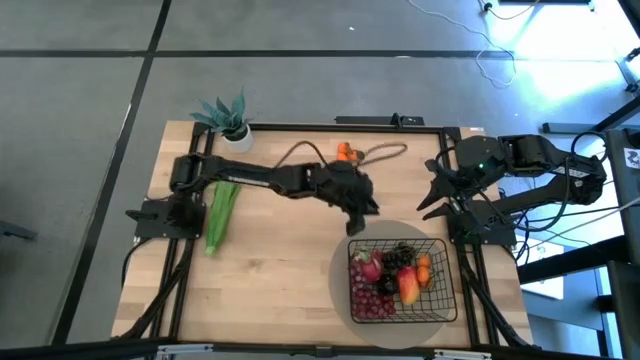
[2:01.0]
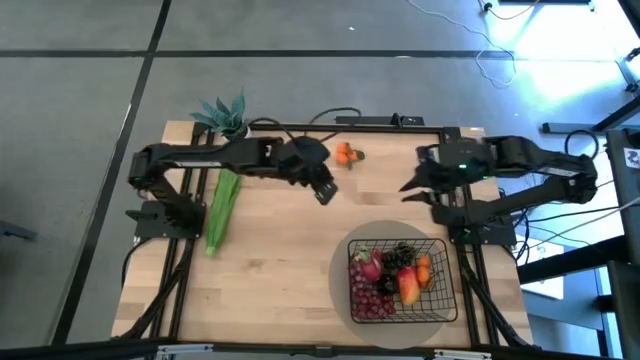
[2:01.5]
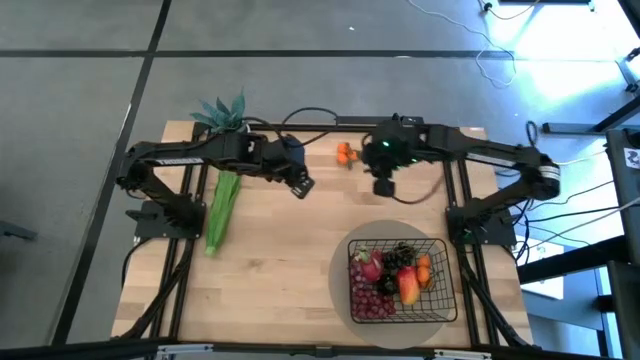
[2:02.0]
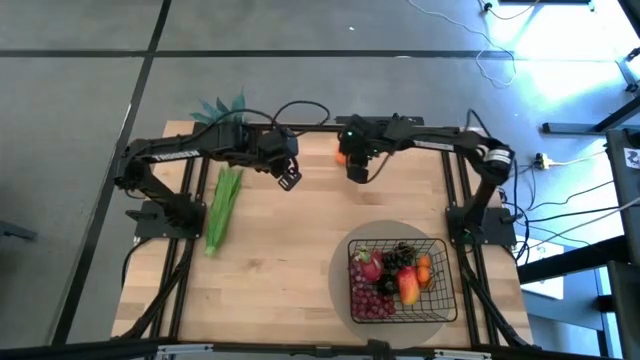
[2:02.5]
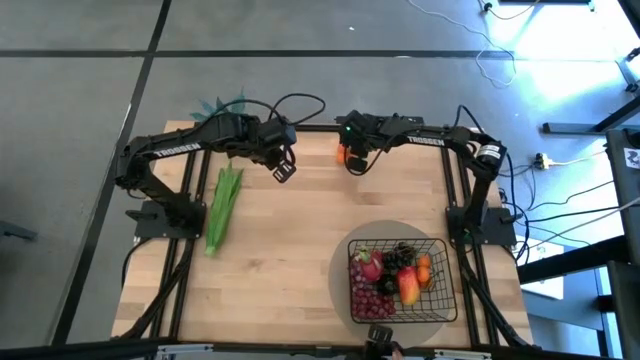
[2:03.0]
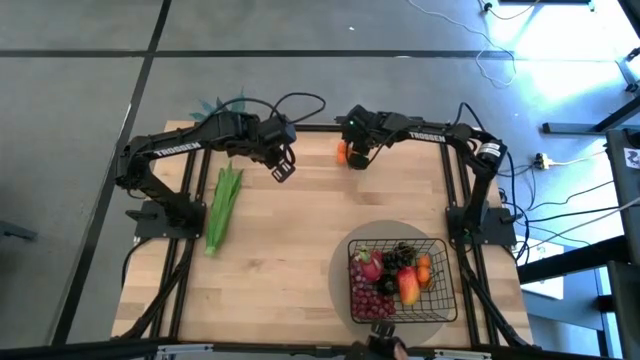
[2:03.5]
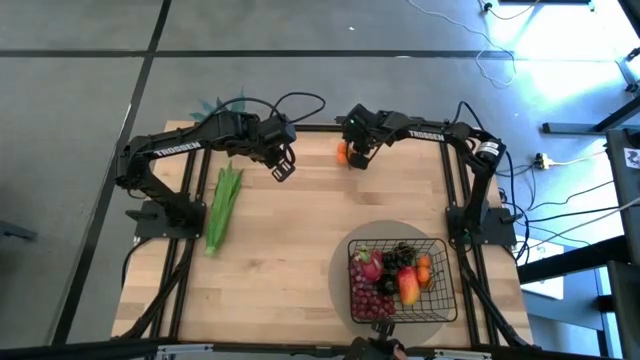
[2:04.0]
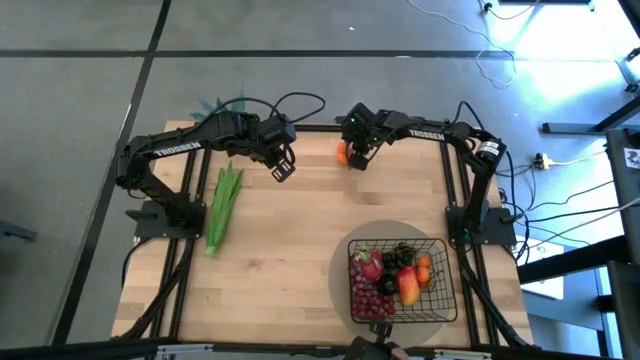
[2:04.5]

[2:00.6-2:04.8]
Task: Build produce basket
Put the orange tangerines into the black wire basket

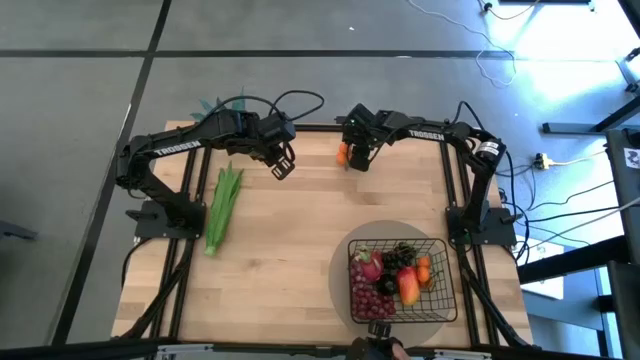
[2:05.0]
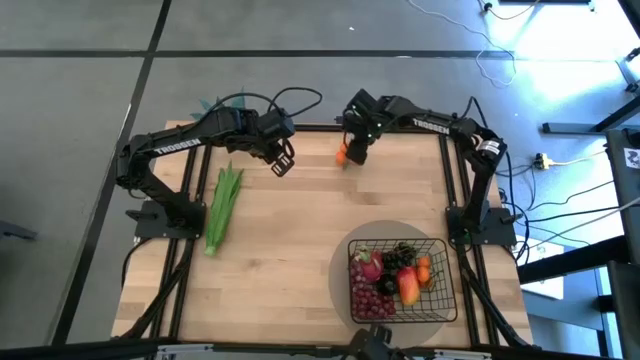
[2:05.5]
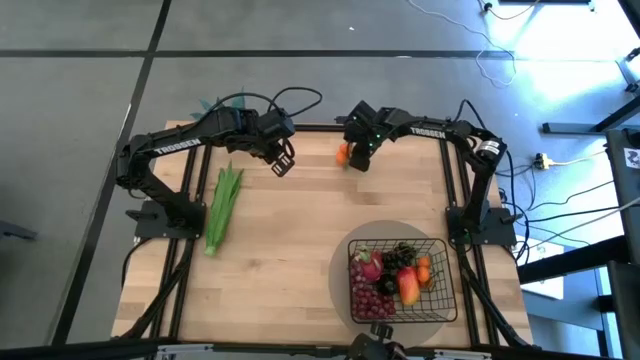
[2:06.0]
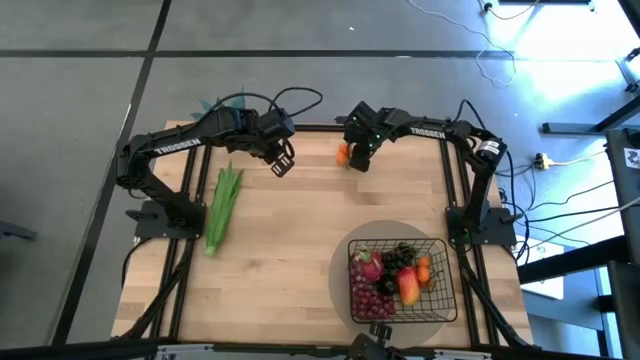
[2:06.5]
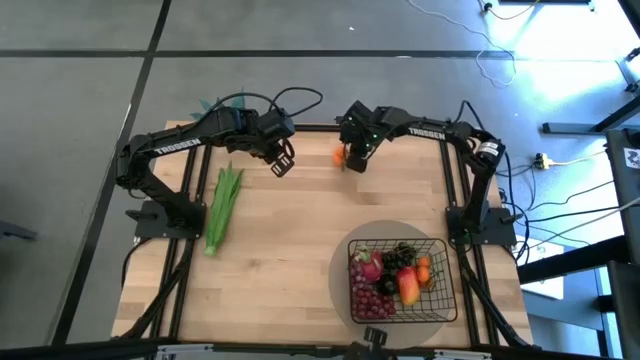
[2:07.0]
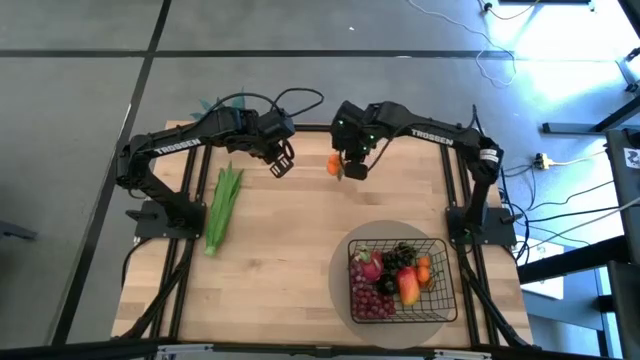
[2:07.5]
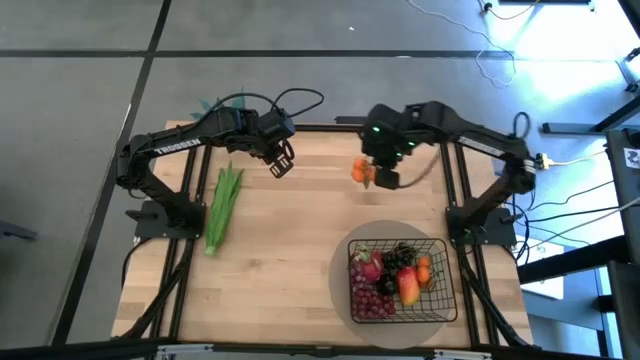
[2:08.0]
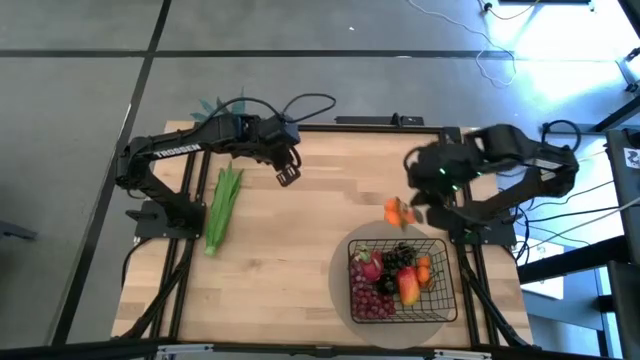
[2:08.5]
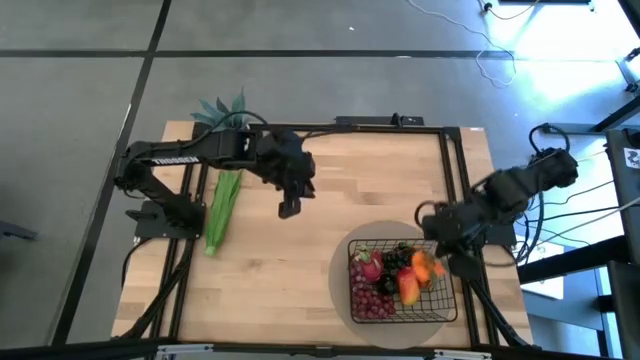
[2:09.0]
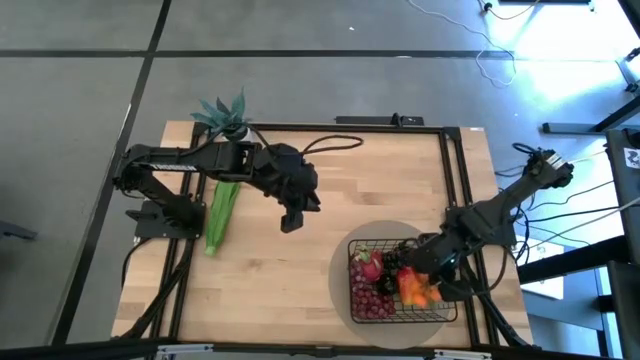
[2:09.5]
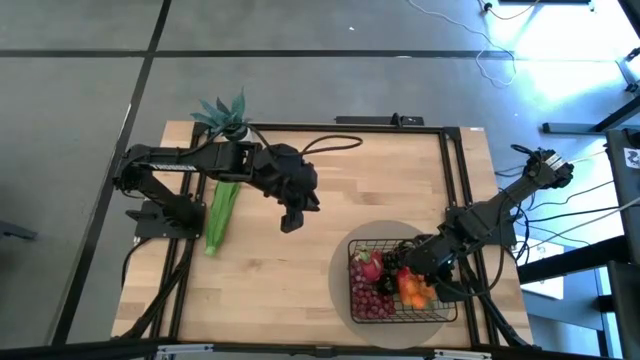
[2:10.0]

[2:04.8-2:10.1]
Put the orange tangerines into the black wire basket

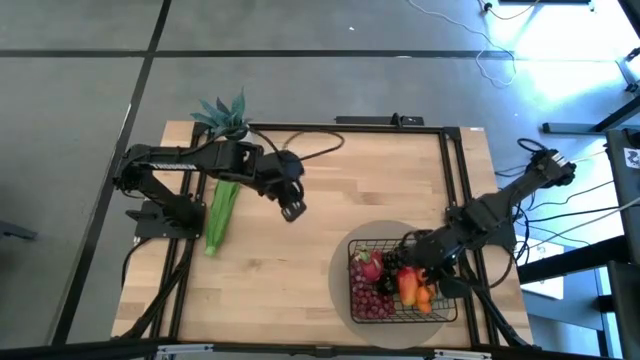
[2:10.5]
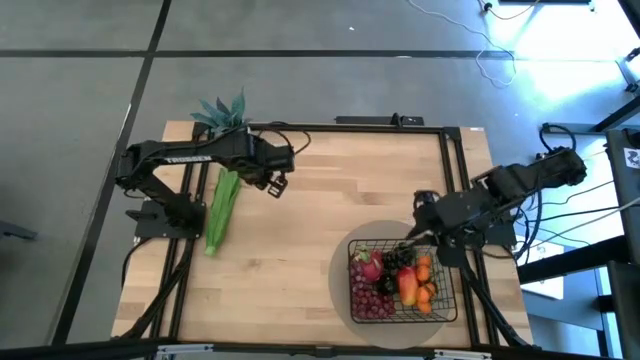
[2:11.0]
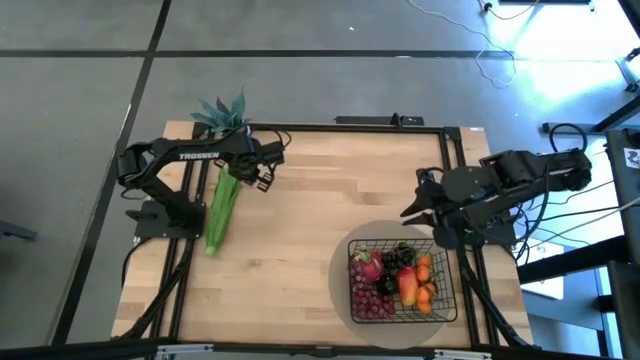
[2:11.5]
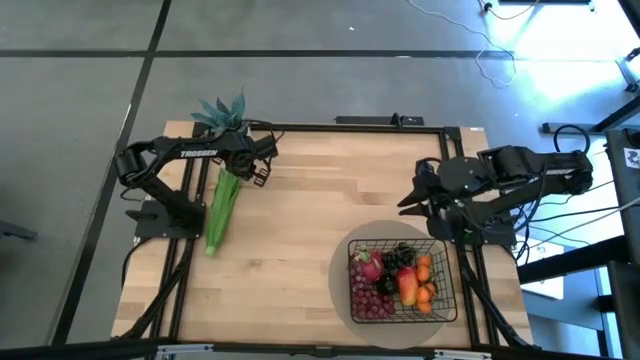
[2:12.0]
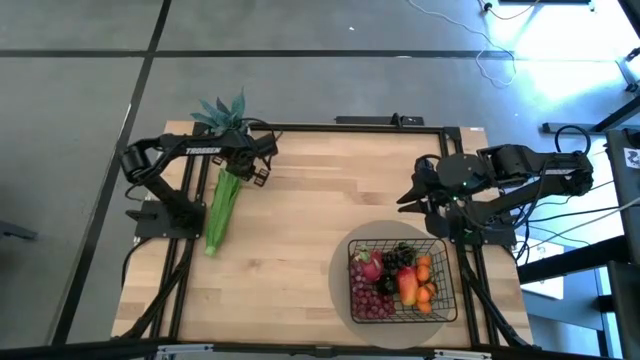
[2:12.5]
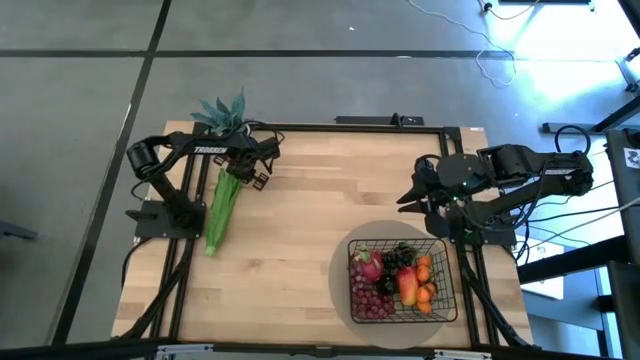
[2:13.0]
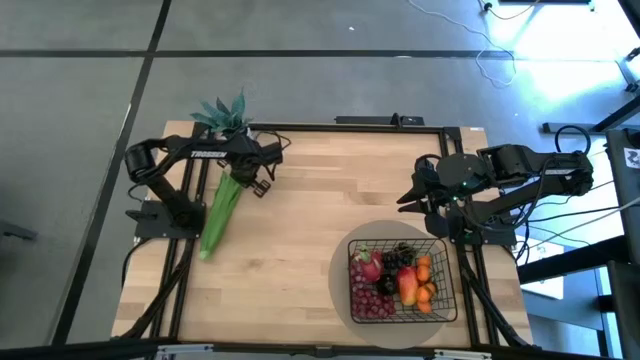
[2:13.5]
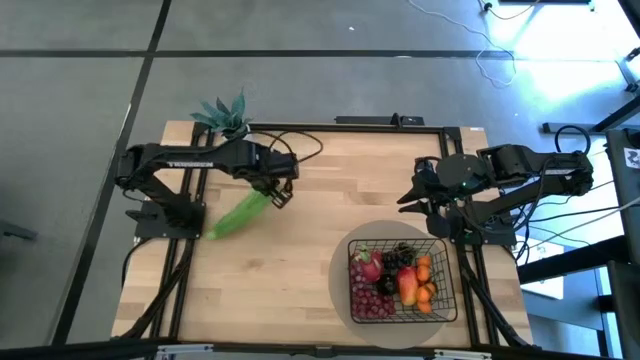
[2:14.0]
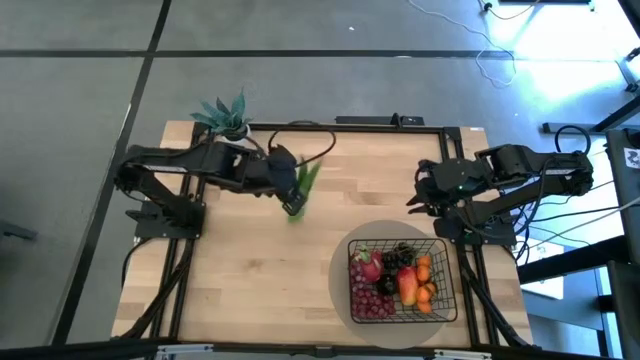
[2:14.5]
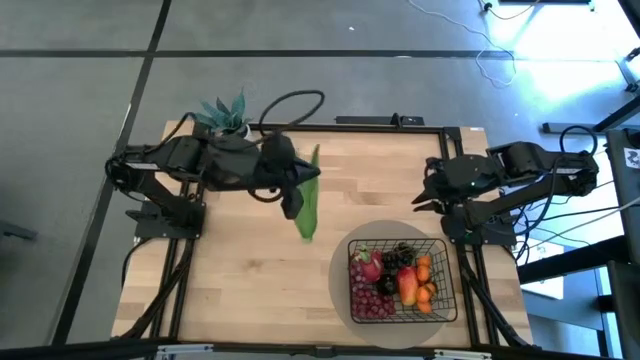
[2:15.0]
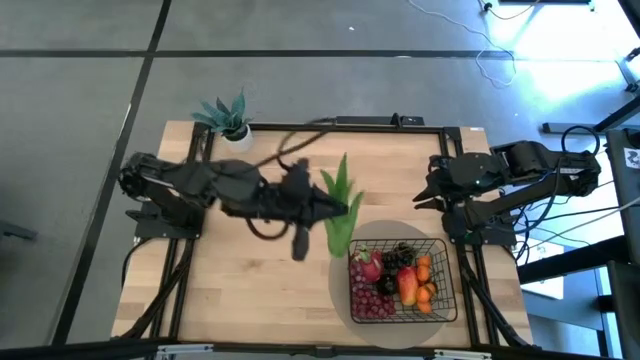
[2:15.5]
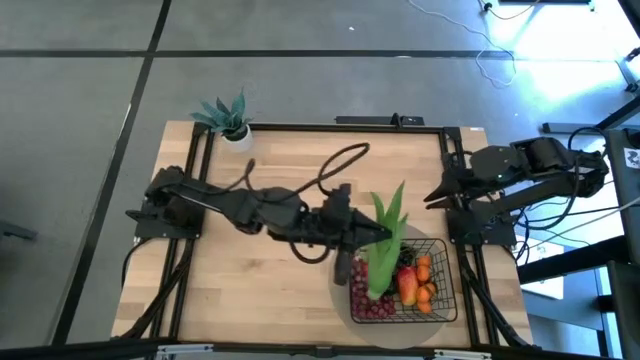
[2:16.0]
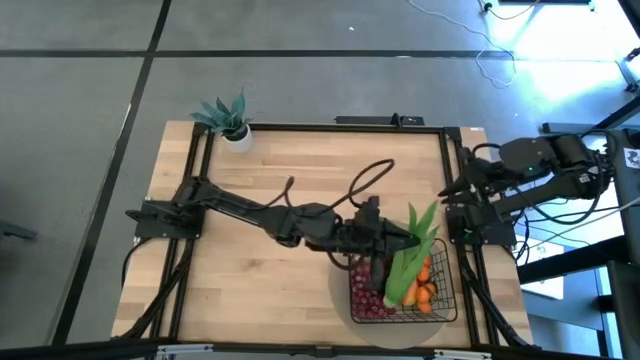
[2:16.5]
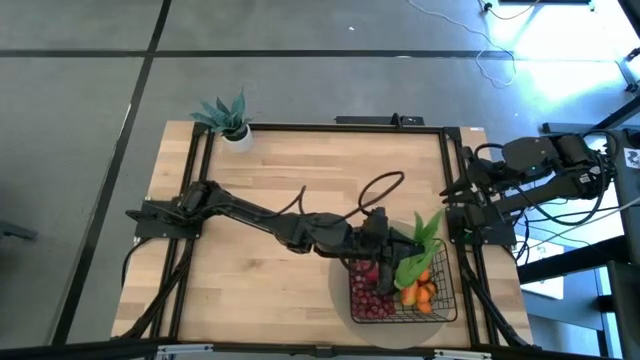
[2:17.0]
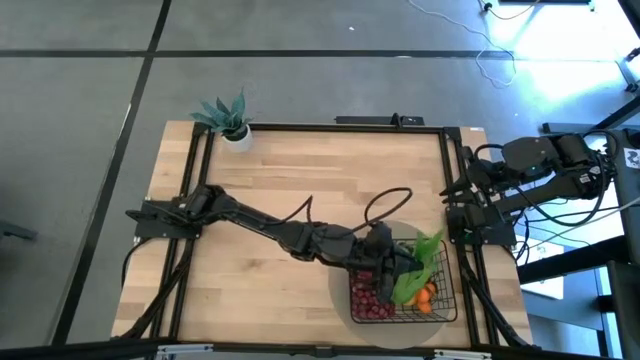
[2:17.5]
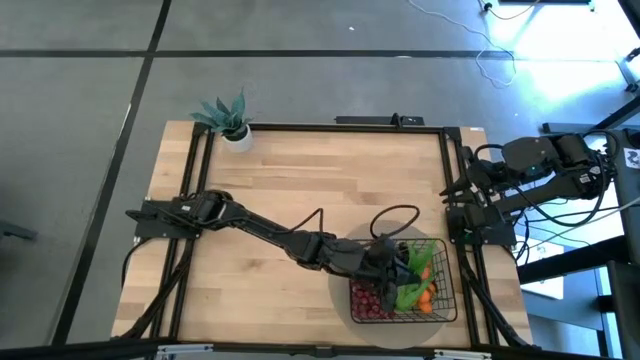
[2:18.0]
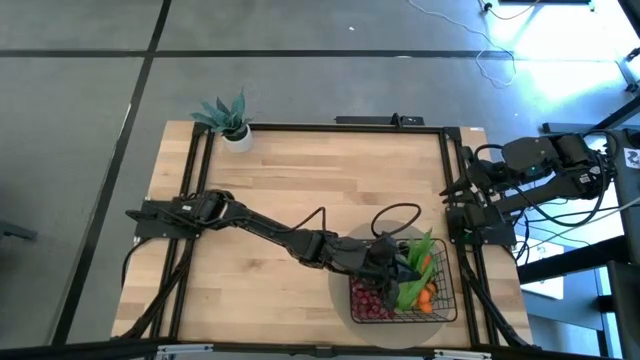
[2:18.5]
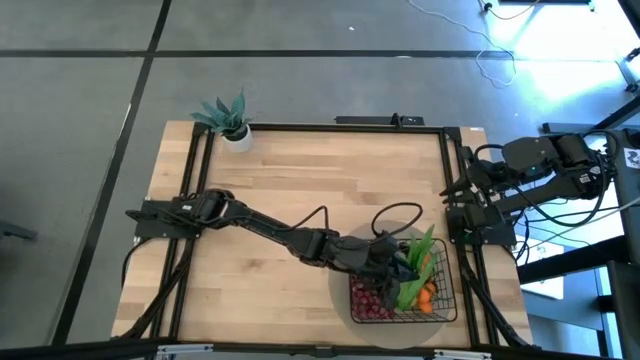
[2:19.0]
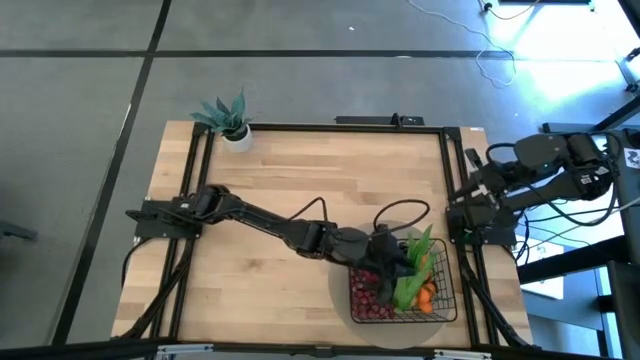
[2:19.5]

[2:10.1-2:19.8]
Put the green leaf lettuce into the black wire basket

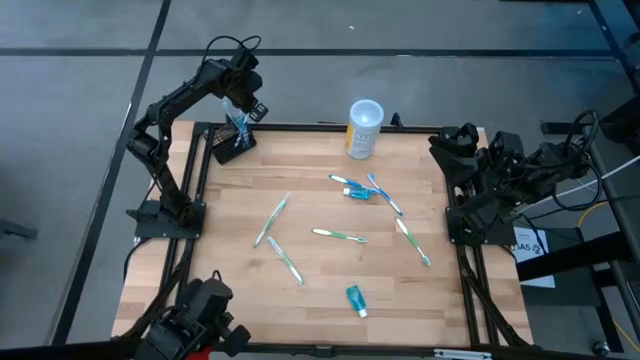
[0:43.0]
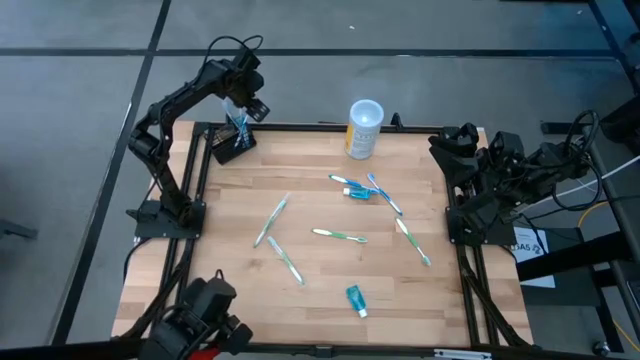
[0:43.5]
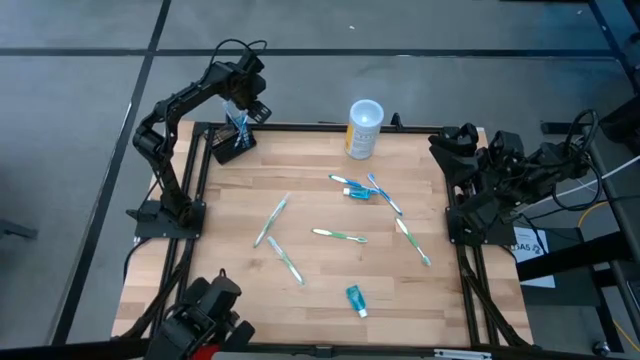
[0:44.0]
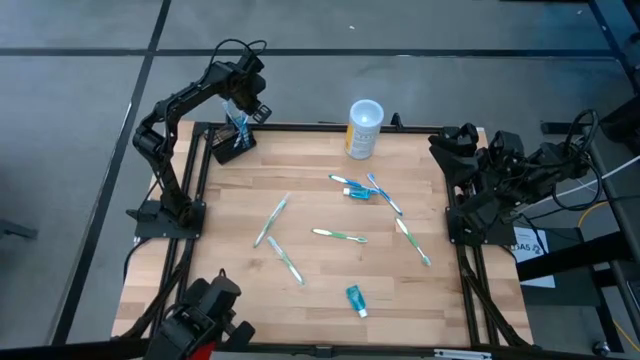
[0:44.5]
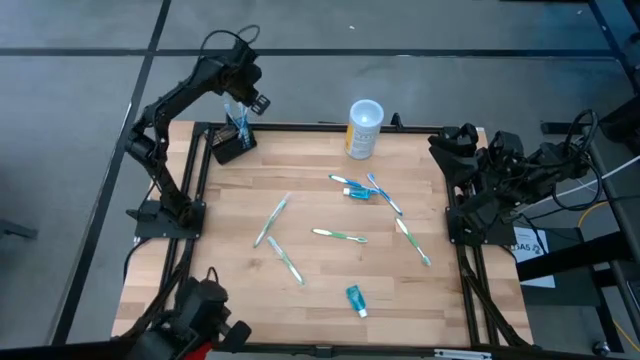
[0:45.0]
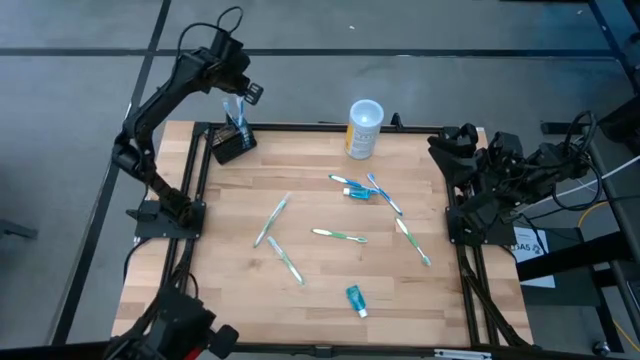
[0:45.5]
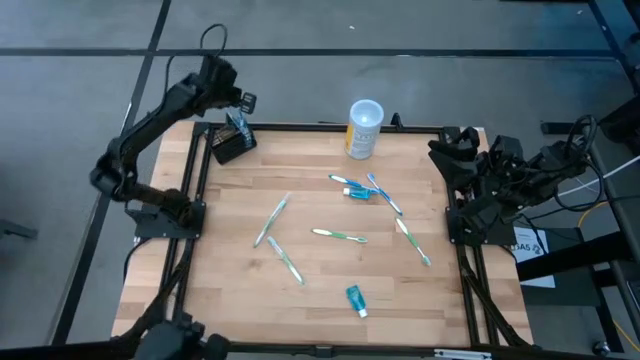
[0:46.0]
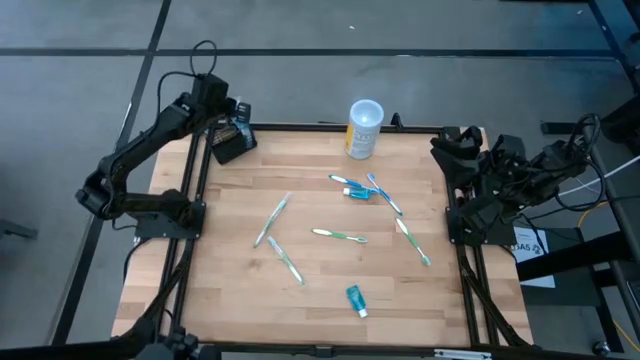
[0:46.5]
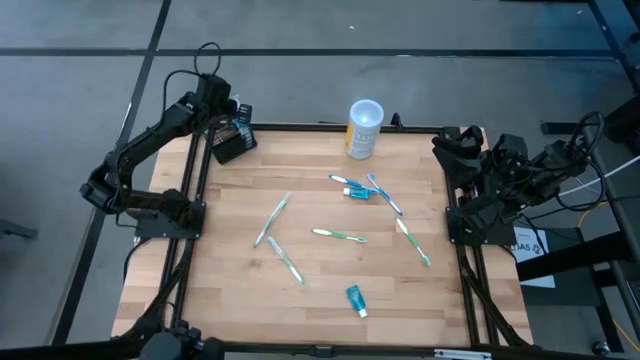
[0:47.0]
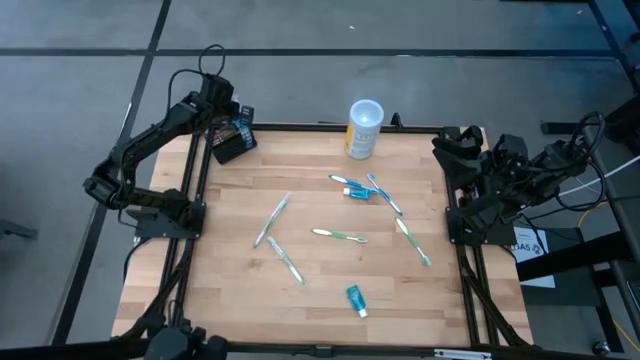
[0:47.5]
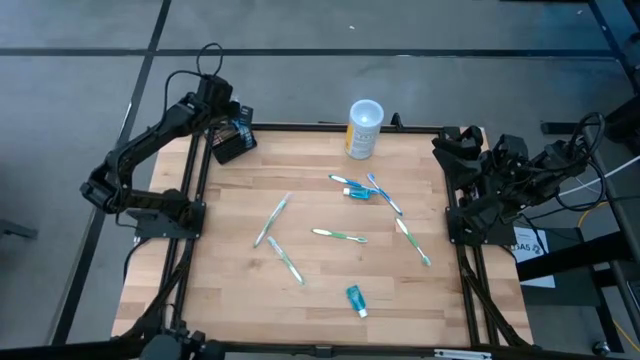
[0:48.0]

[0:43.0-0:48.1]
Task: Pick & Place toothbrushing station
Put the blue toothbrush into the right section of the black organizer
